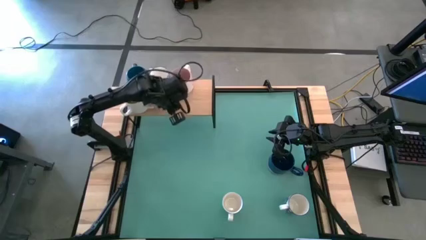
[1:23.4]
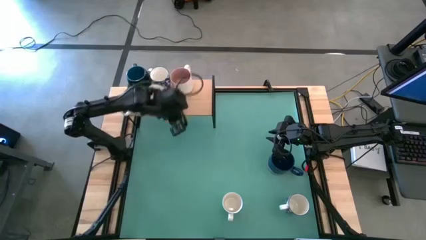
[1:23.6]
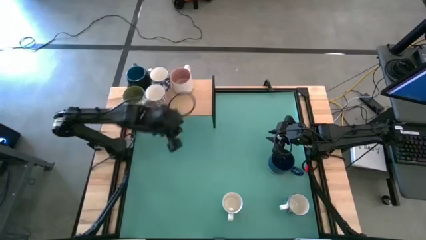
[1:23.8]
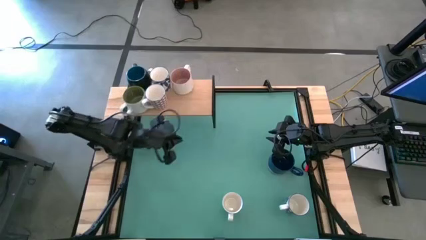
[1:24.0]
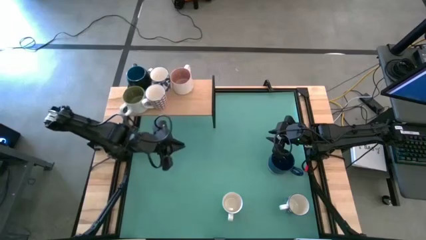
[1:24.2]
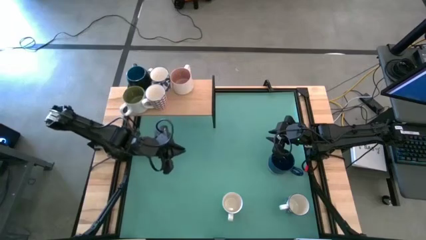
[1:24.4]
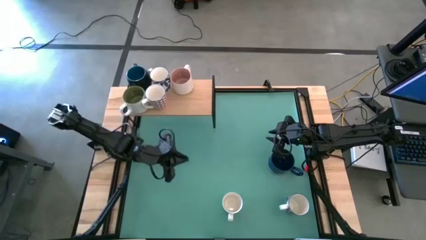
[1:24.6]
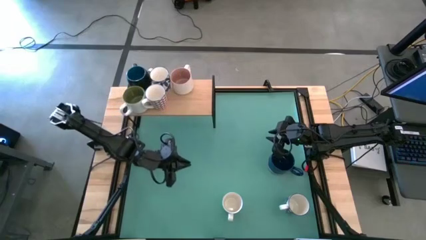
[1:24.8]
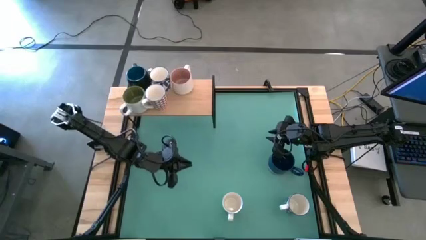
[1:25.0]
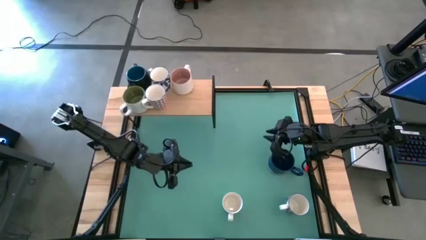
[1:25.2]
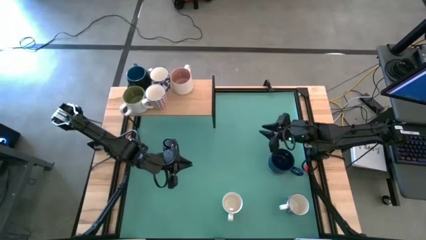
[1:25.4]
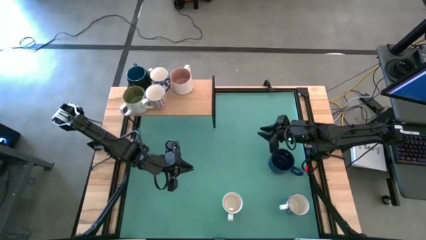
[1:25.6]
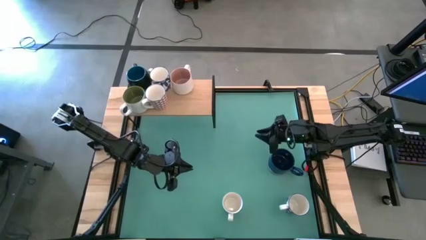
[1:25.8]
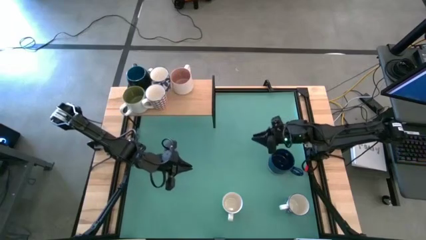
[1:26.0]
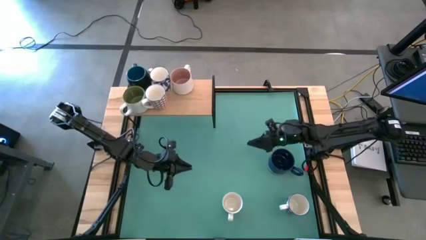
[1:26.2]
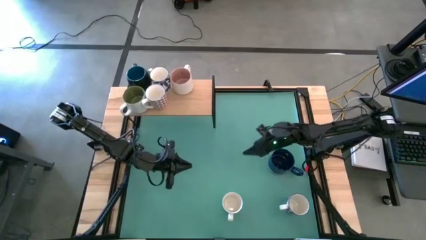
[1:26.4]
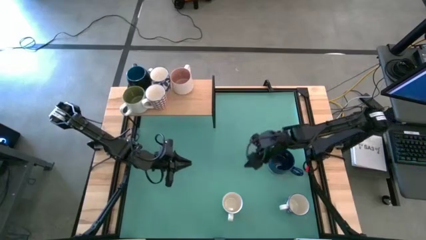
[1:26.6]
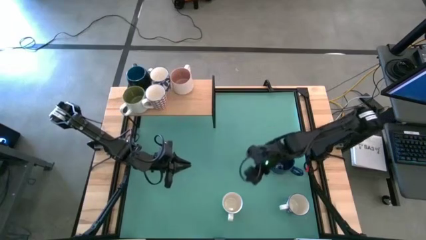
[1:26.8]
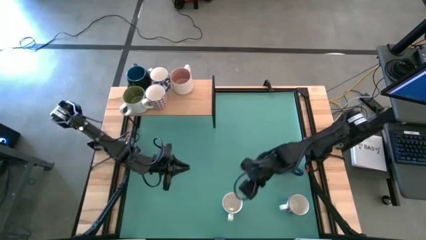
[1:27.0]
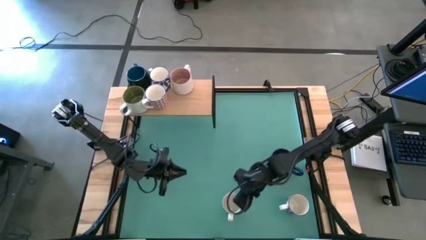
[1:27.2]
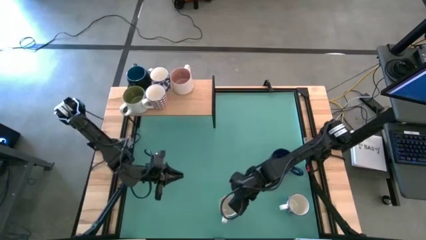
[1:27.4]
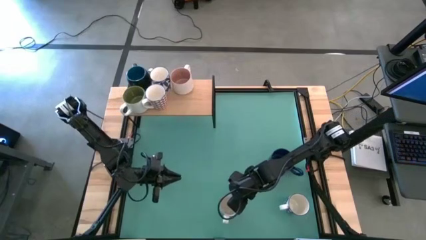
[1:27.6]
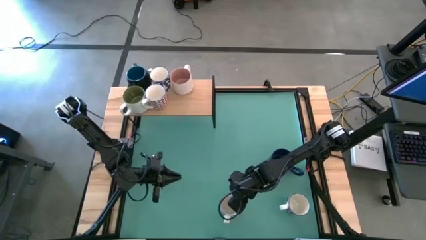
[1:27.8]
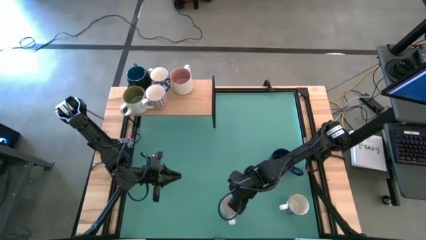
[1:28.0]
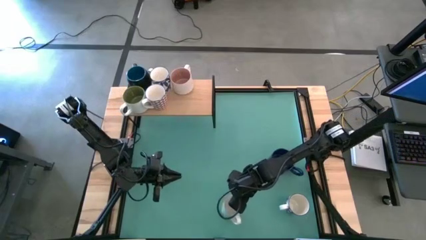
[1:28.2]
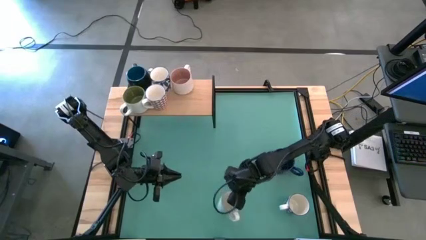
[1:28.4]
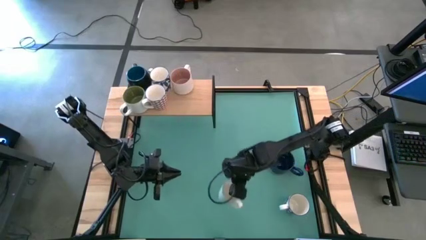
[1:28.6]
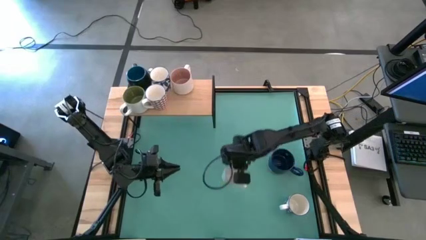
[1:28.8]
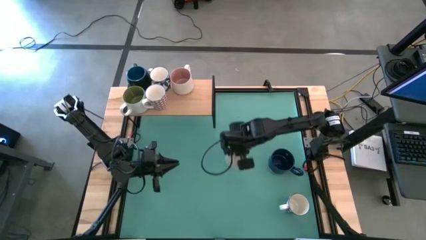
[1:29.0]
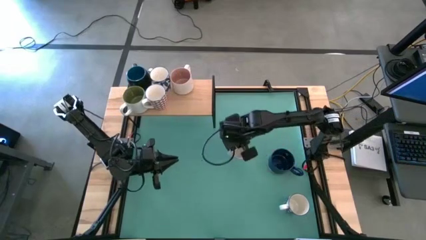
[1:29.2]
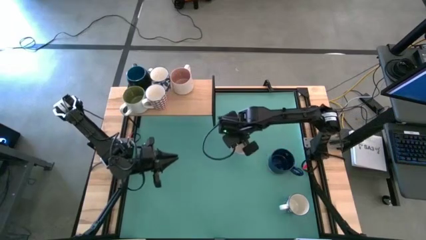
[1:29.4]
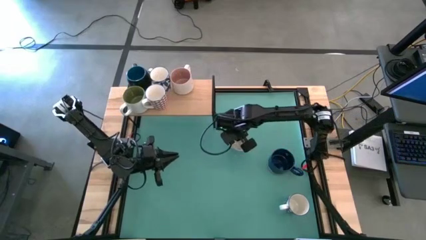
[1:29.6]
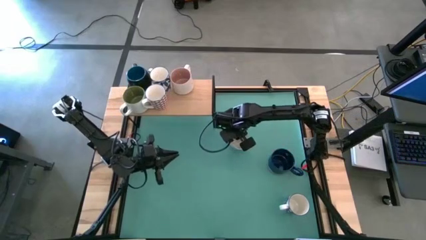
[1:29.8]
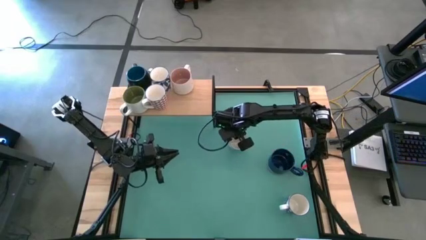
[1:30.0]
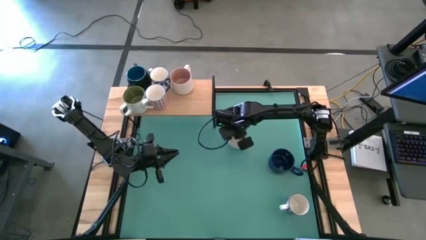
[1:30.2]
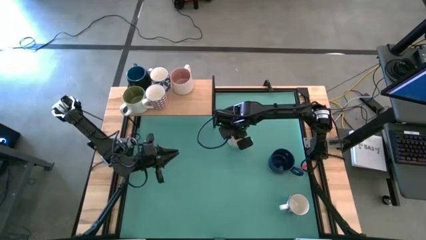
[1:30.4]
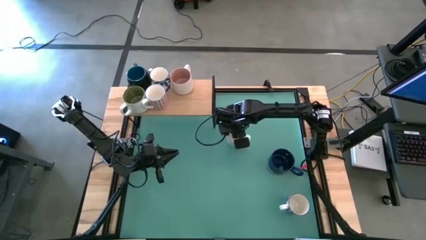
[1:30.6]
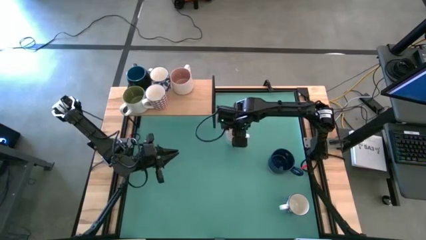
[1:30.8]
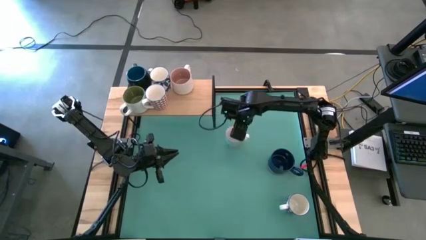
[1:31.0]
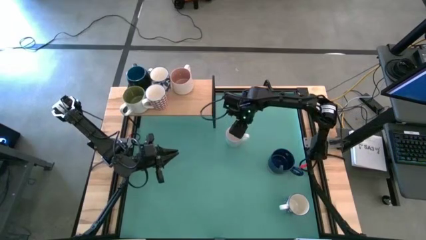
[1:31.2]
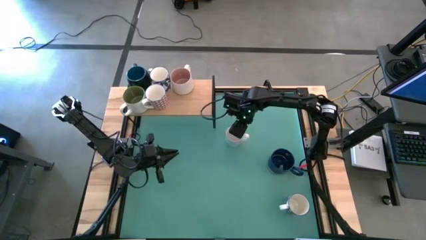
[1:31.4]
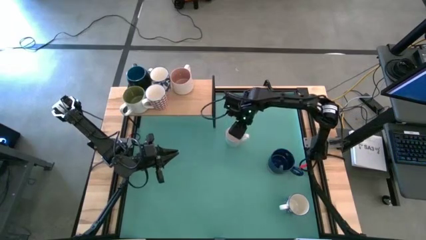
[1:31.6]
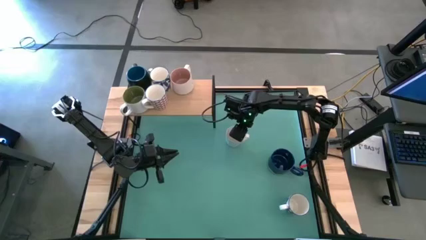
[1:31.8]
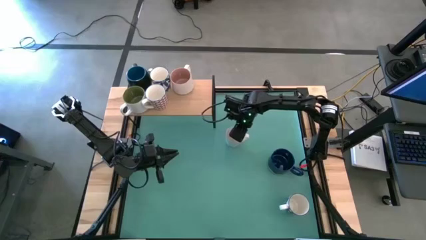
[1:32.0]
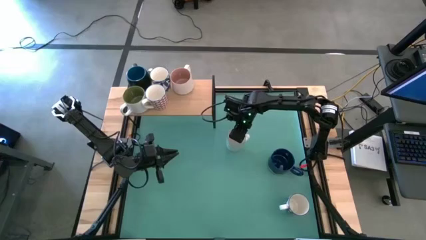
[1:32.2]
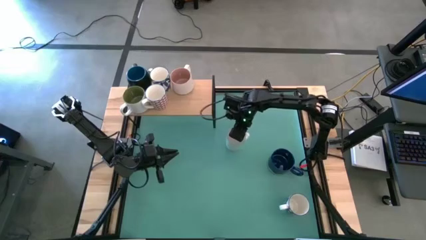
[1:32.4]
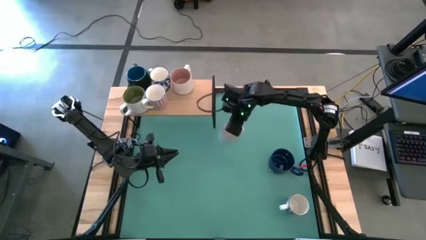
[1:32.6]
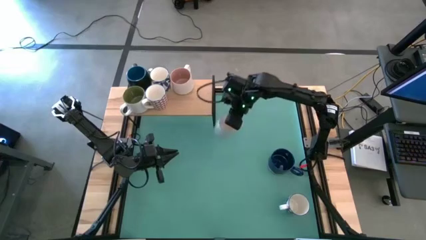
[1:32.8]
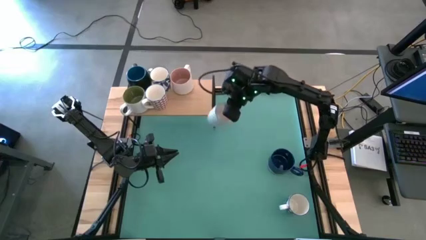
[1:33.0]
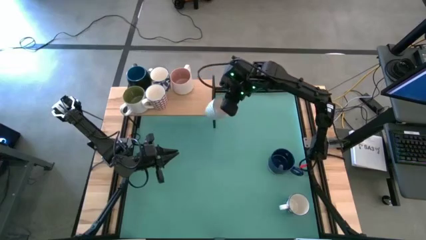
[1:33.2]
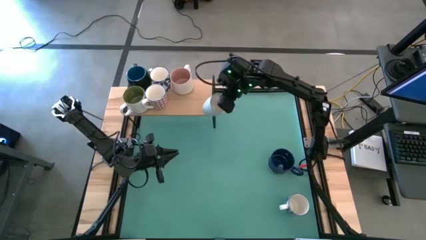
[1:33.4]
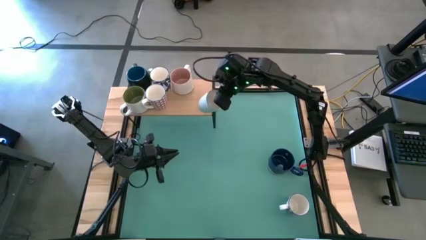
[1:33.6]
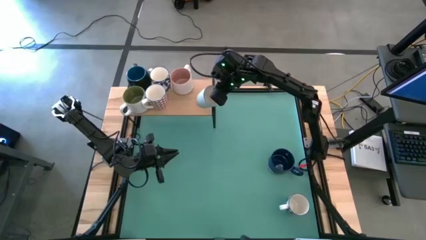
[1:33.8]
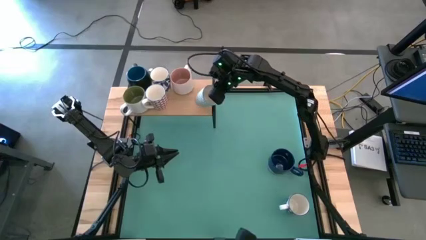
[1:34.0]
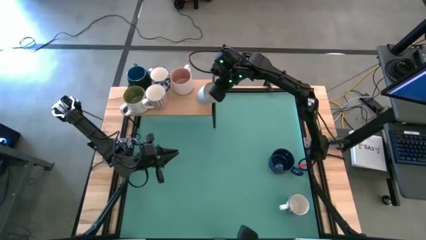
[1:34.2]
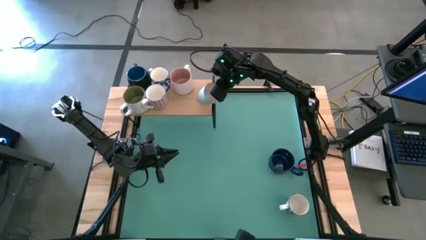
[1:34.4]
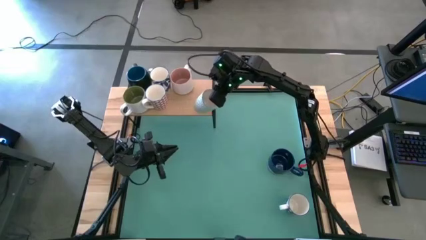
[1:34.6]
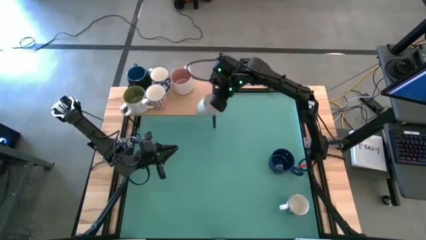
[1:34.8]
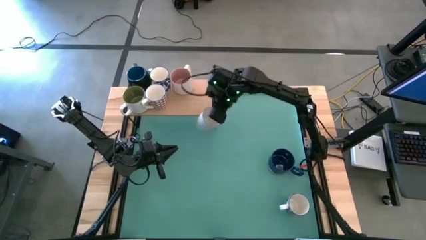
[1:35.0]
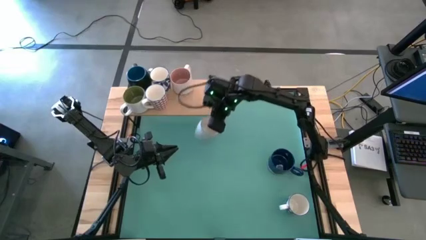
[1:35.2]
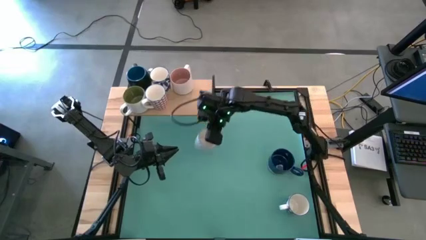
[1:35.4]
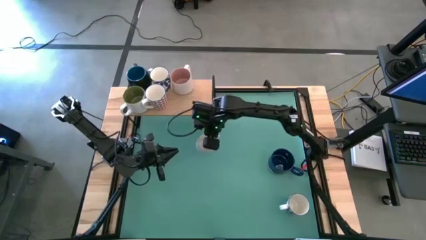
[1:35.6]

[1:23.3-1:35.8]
Task: Place coffee mugs
Put the white gray patterned mug on the shelf
